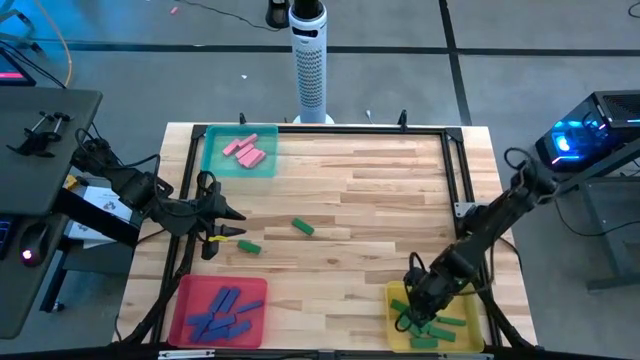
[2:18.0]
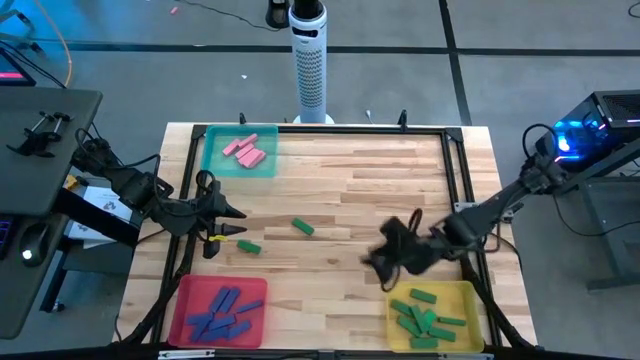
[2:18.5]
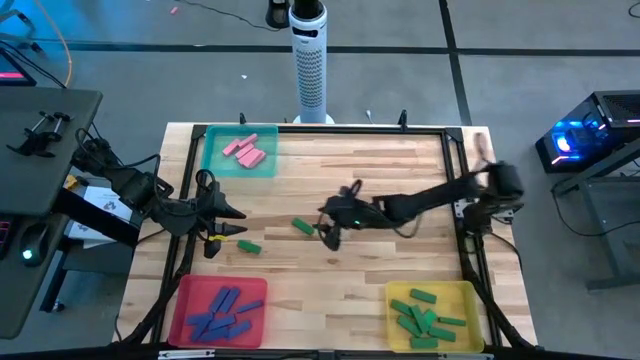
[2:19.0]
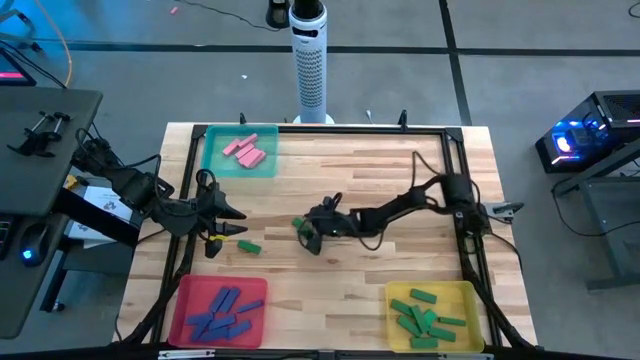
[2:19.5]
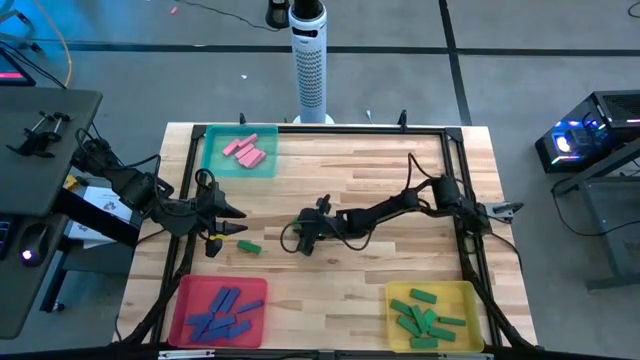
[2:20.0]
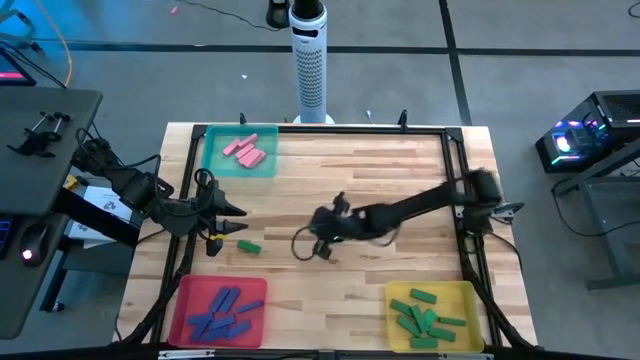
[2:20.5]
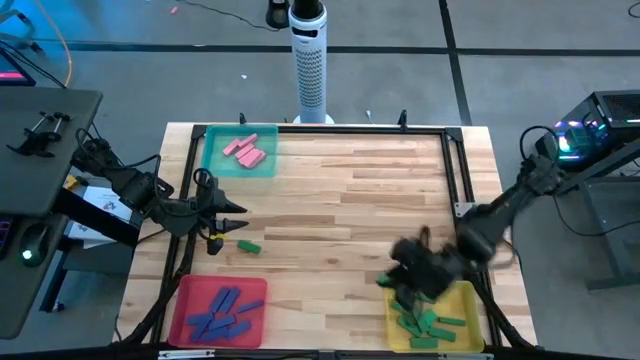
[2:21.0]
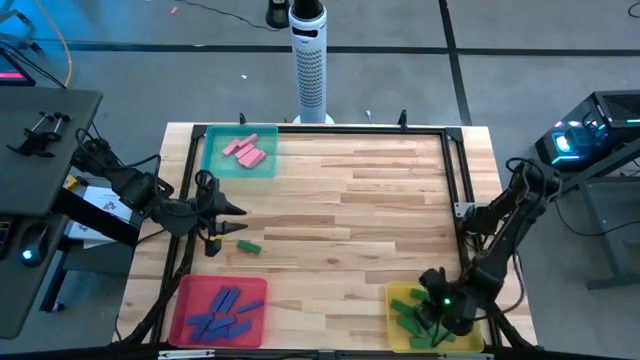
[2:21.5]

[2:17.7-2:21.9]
Task: Sort blocks
Put the green block into the yellow bin

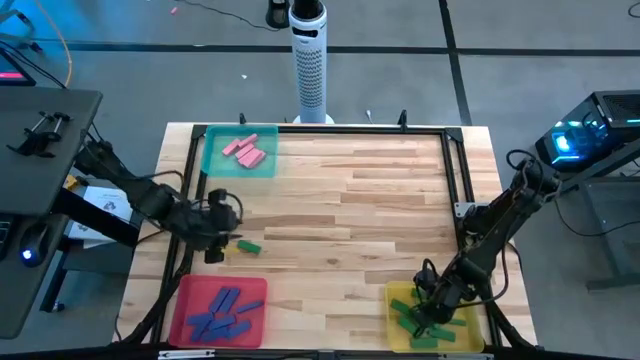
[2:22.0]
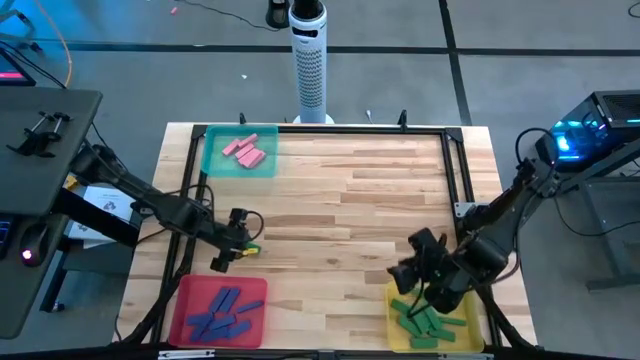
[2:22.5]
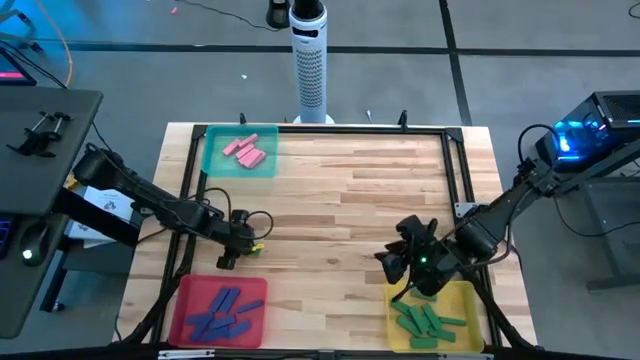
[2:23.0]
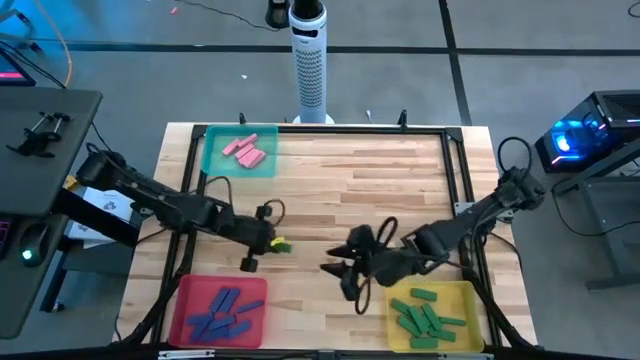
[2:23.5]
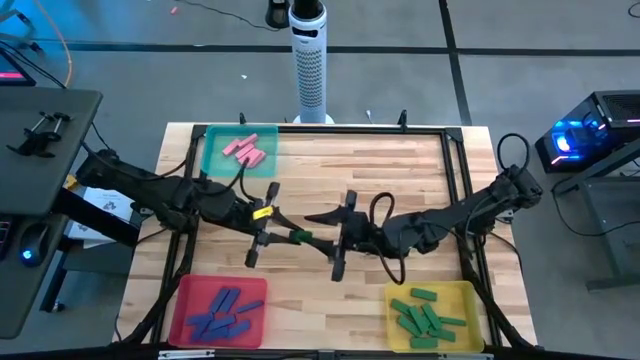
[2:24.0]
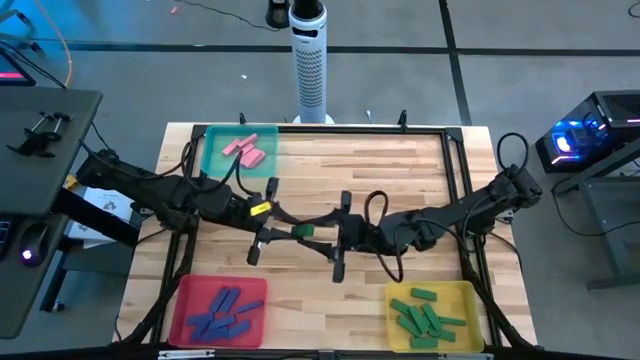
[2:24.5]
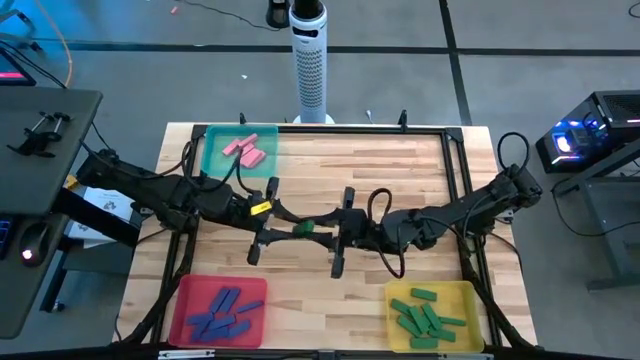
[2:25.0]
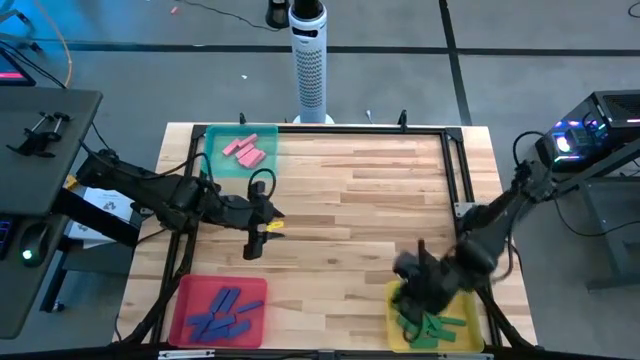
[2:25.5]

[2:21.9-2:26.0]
Put the green block into the yellow bin

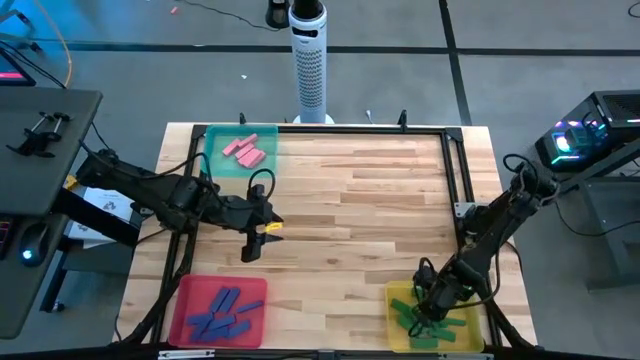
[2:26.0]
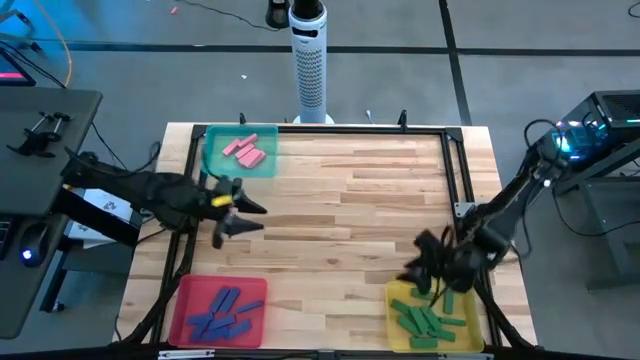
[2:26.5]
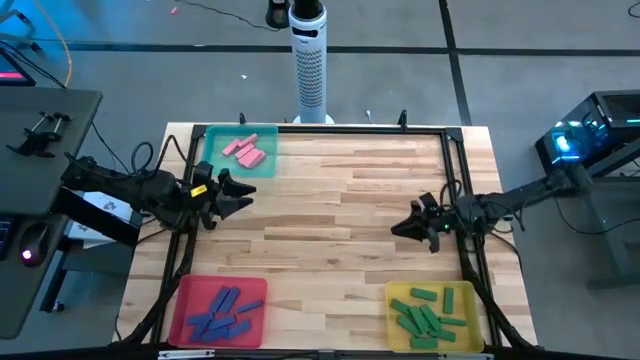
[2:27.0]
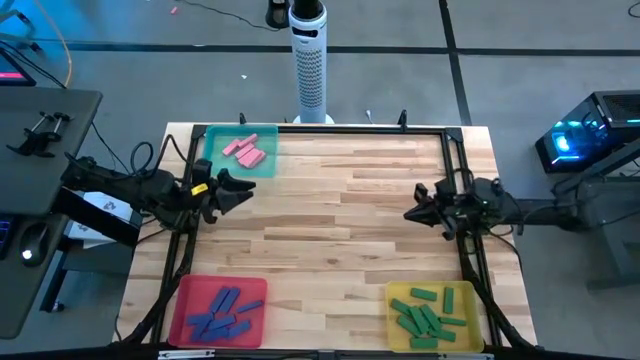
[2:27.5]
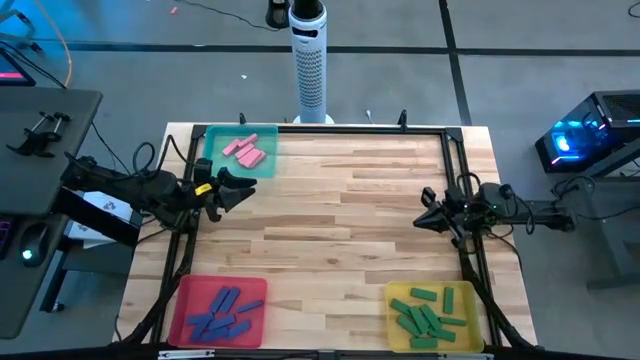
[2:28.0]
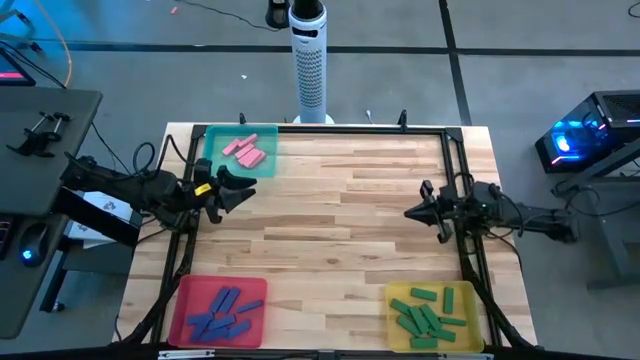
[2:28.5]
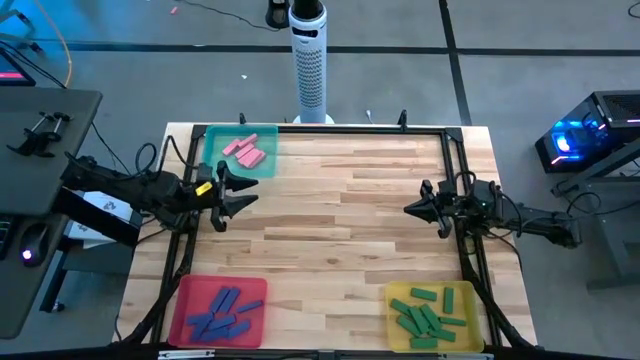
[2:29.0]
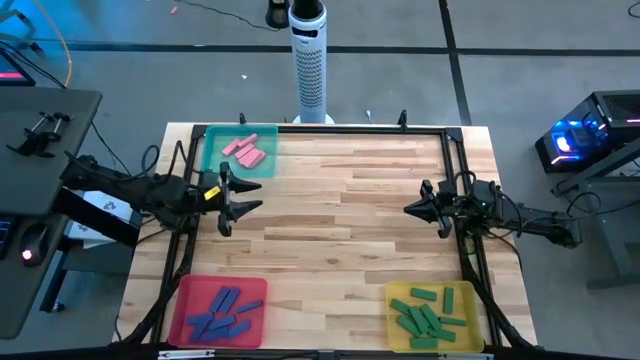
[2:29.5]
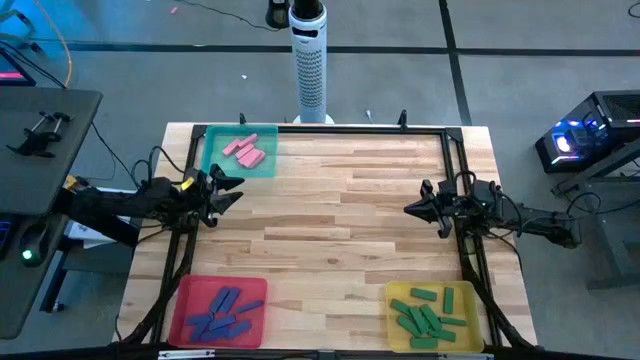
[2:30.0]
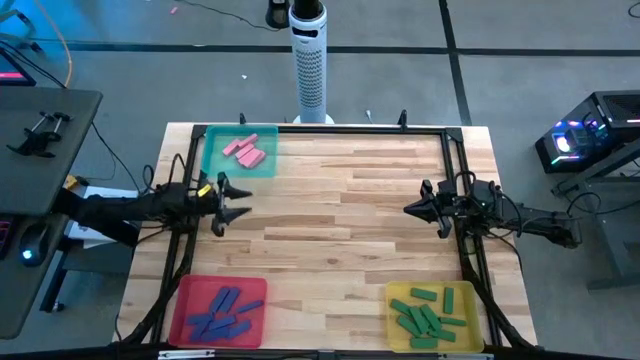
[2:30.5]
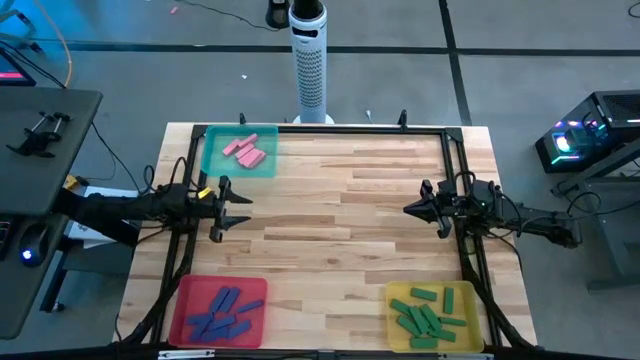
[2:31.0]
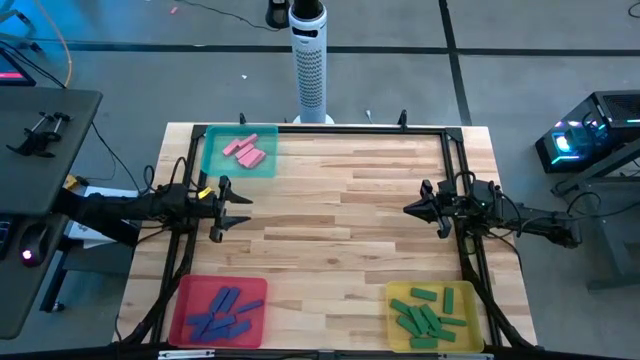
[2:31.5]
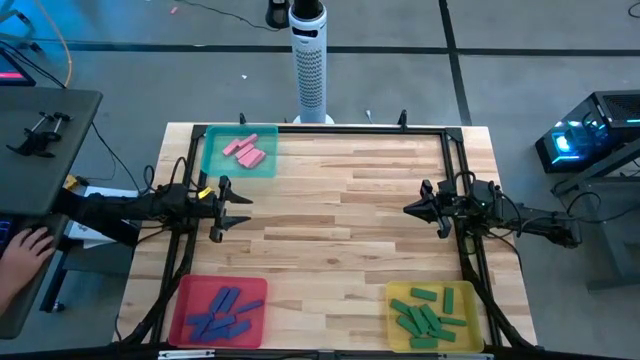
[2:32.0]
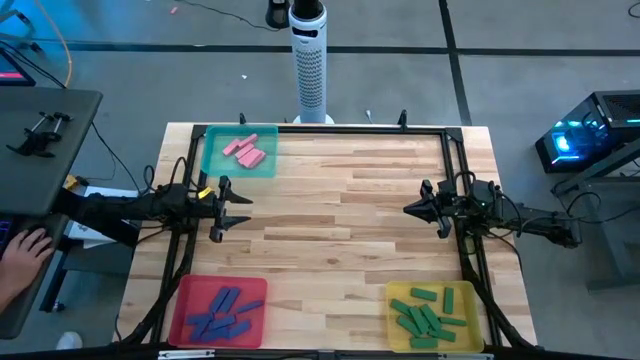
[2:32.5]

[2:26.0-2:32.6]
Return to Home Position

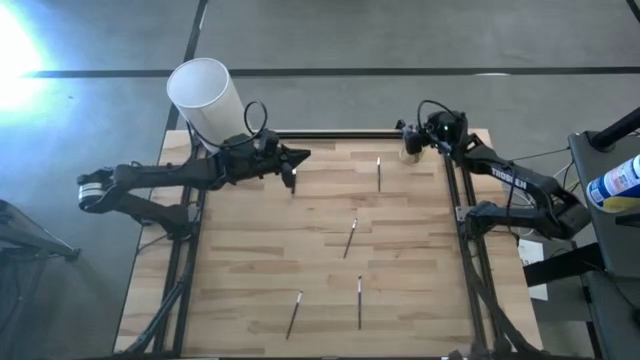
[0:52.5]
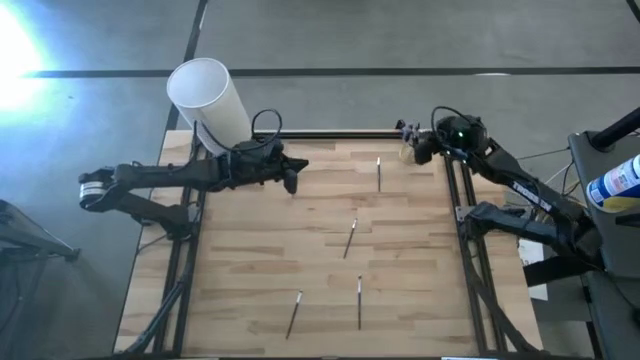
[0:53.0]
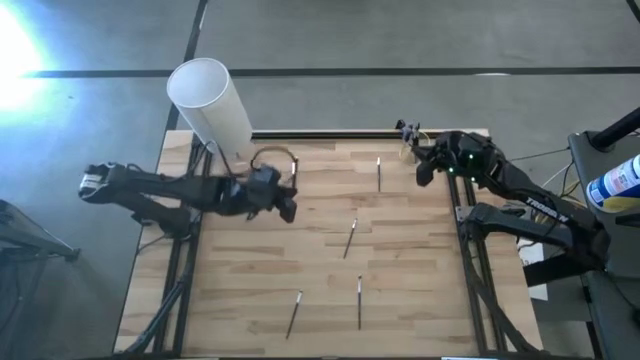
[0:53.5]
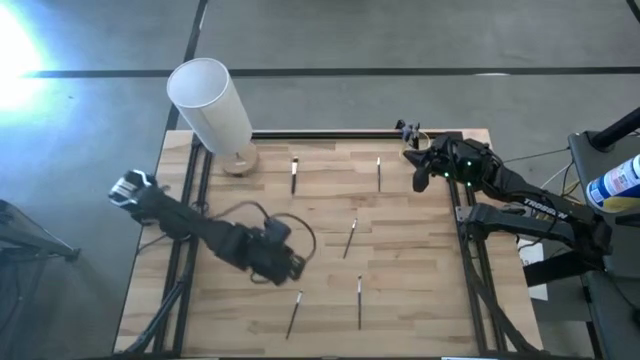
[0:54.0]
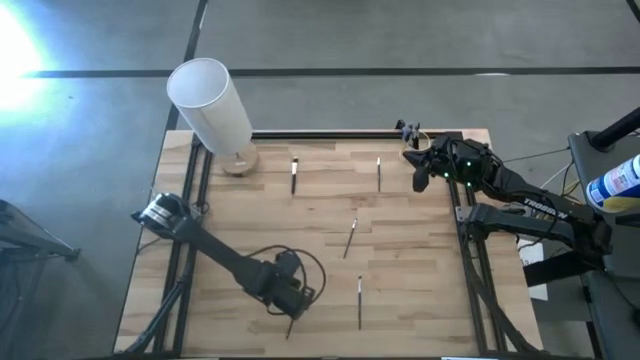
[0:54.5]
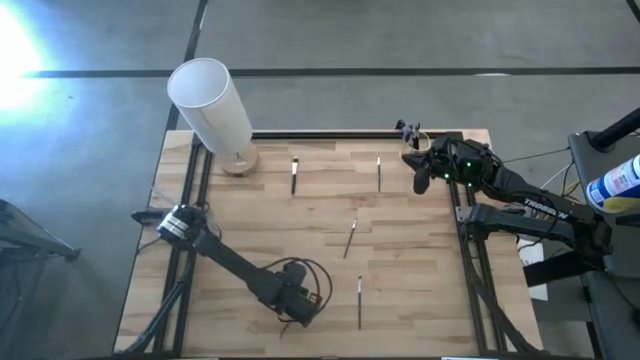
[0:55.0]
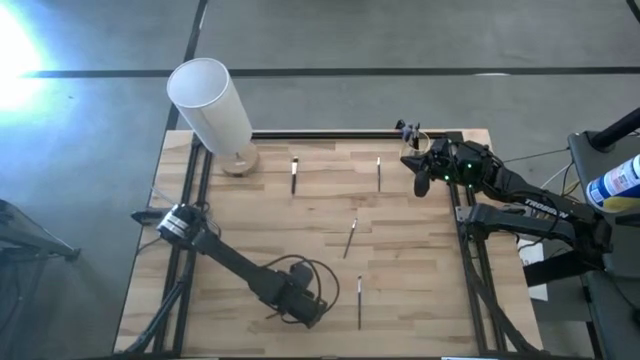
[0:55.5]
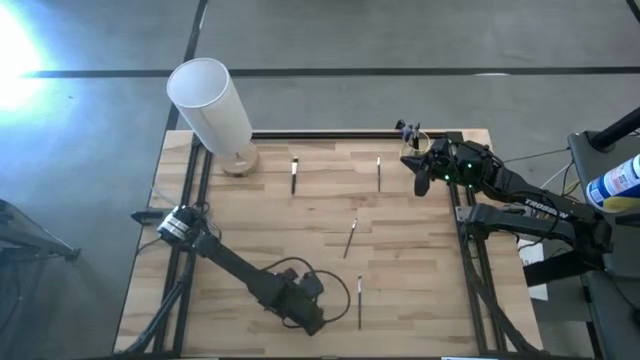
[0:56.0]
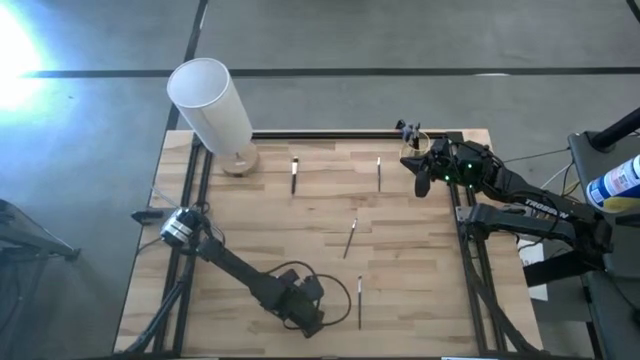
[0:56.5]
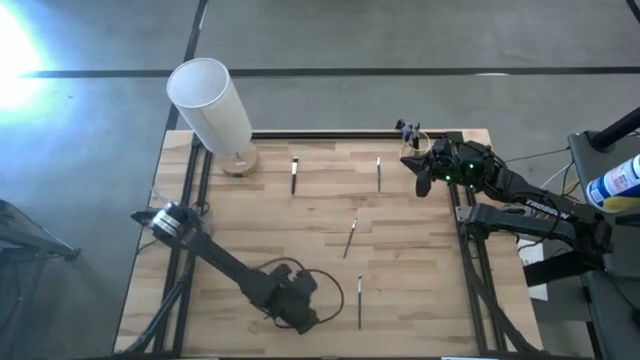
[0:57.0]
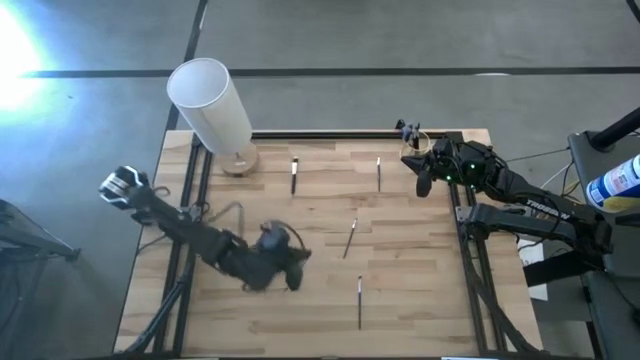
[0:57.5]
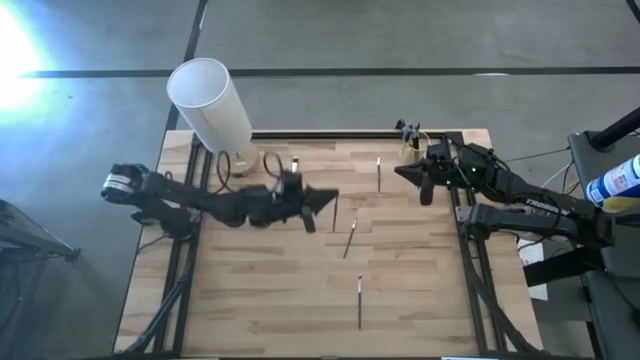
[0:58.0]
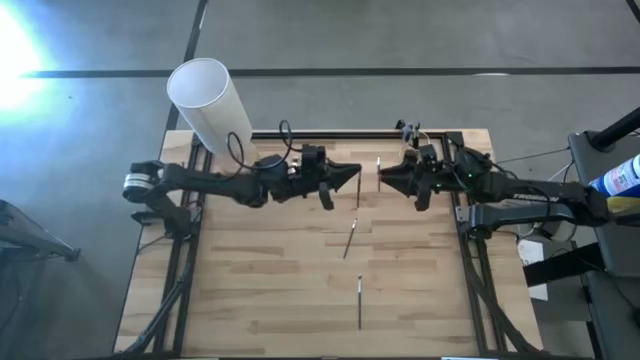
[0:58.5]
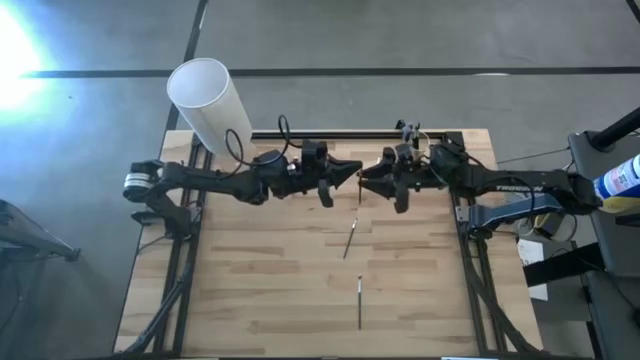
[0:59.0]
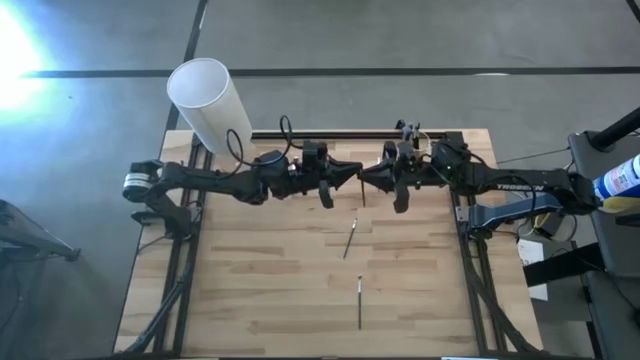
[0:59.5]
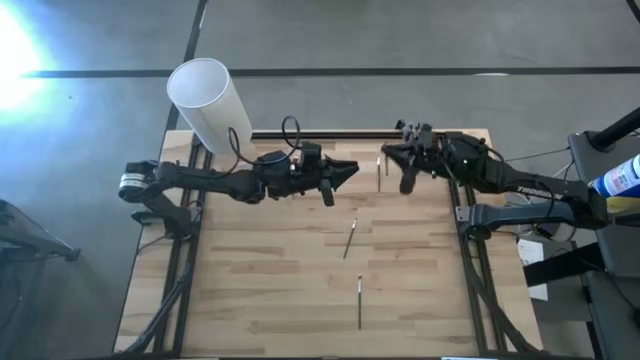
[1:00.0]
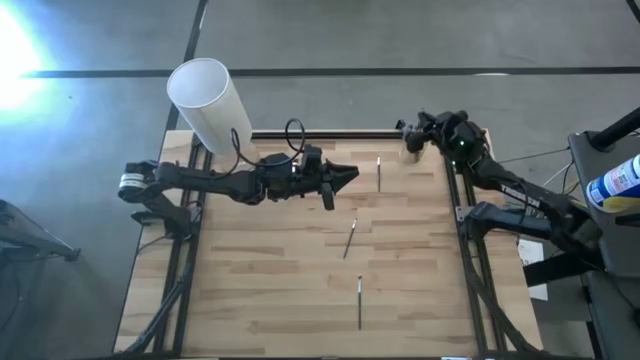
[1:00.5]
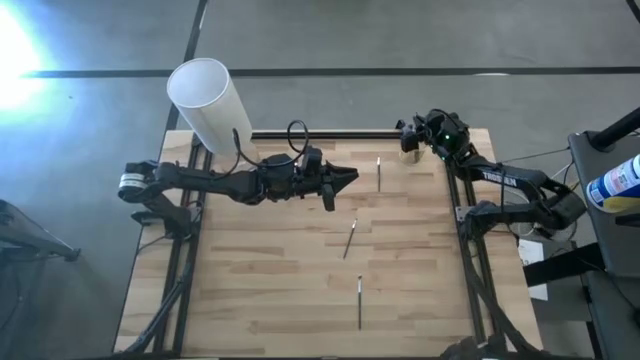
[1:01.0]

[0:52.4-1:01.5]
Task: Put items in baskets/containers
Put the eyeshadow brush into the yellow container
